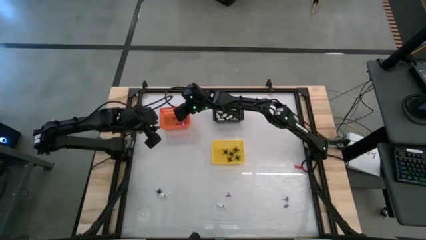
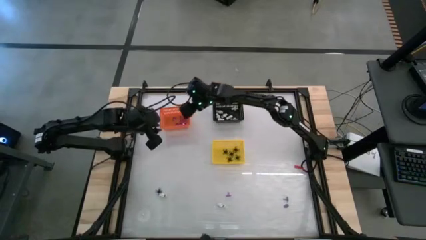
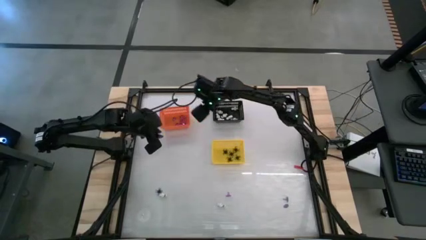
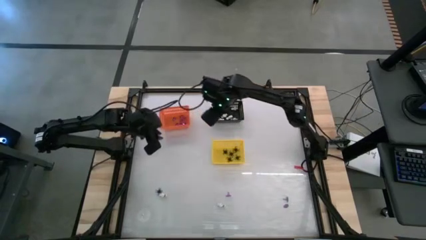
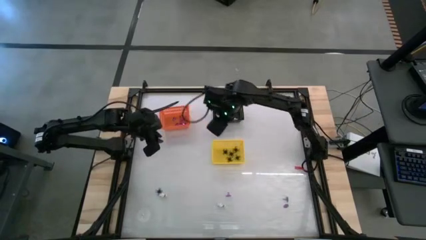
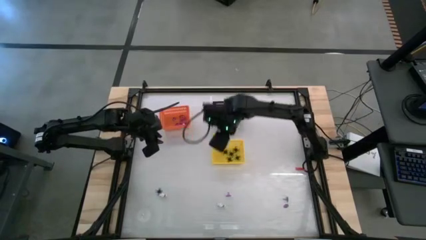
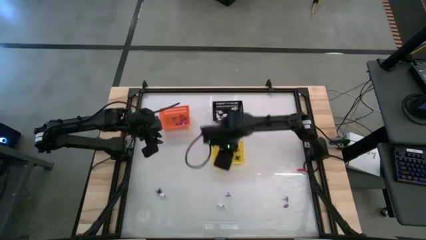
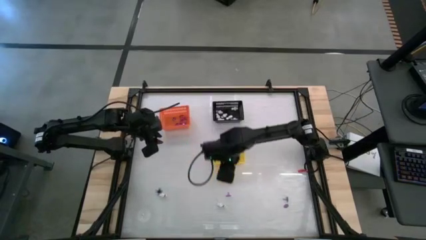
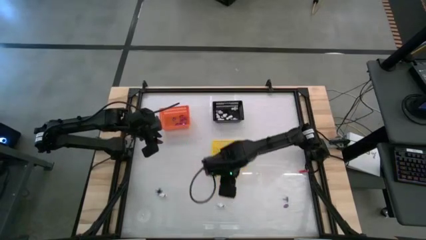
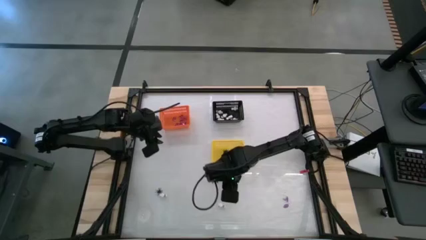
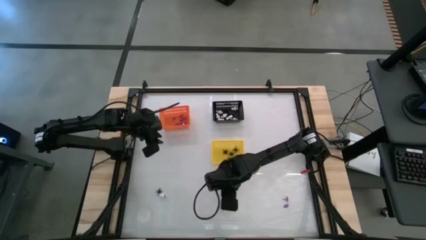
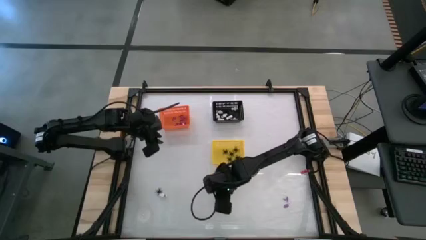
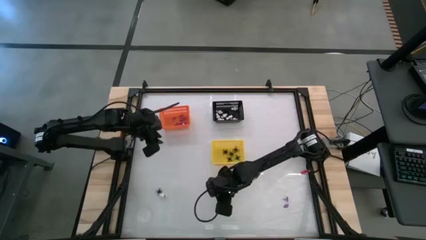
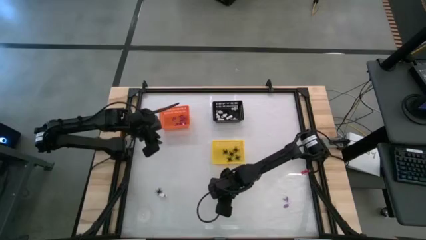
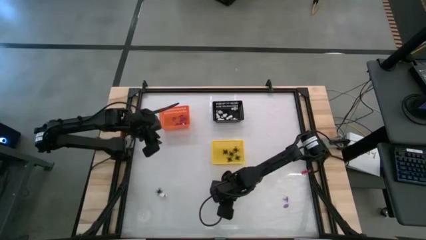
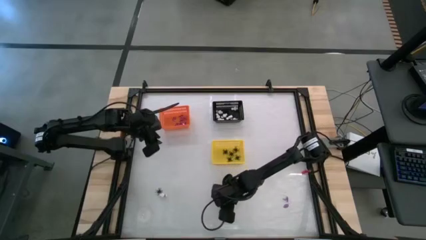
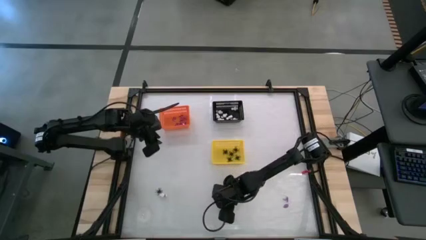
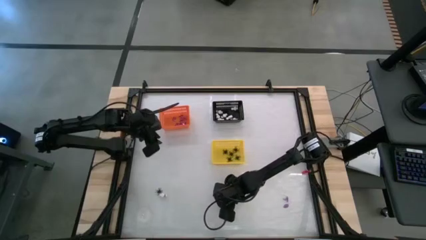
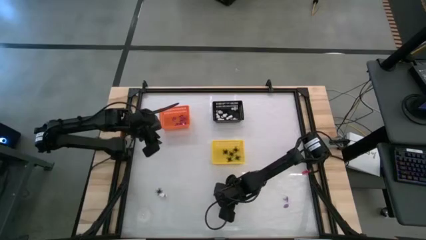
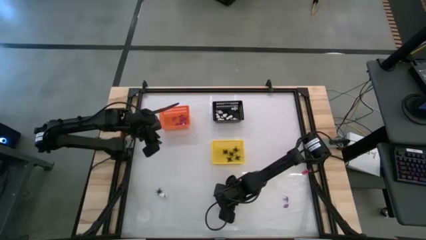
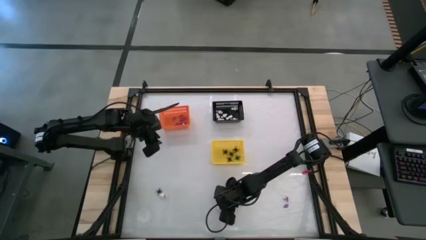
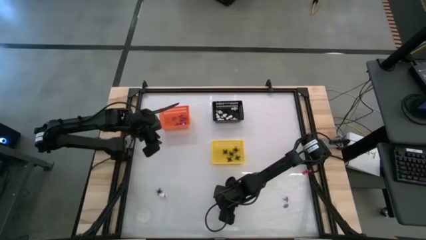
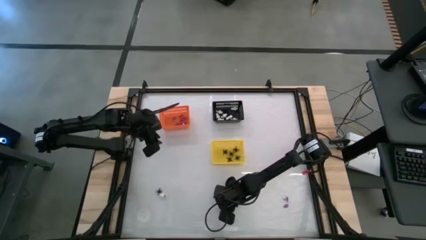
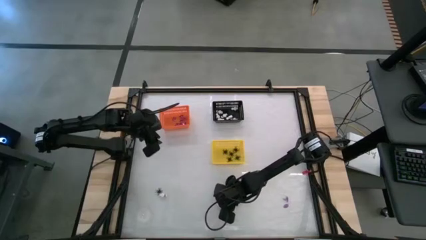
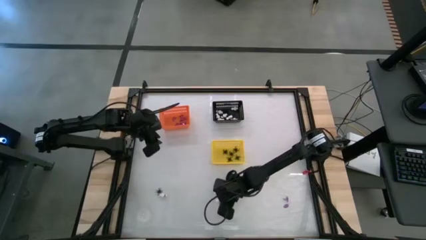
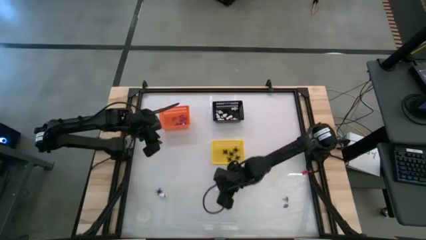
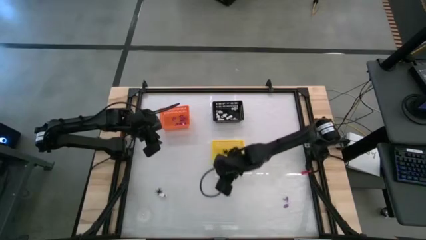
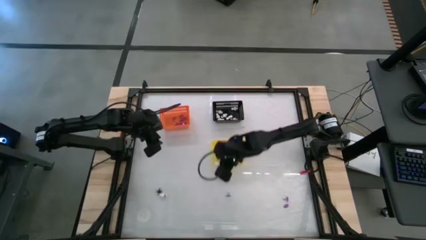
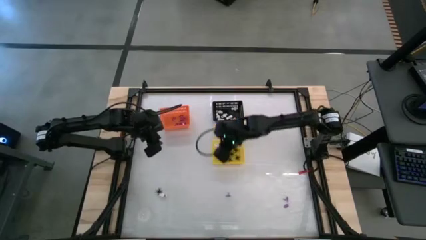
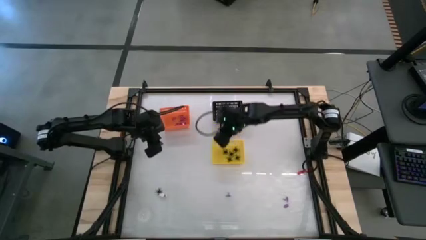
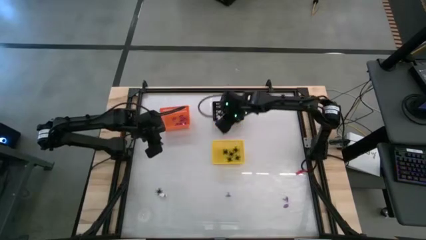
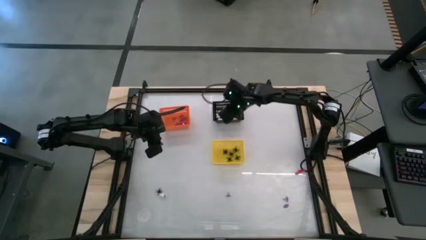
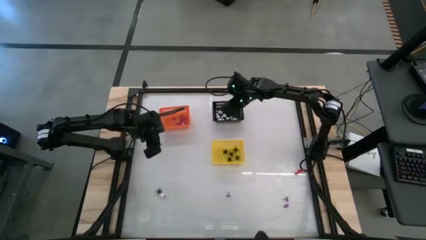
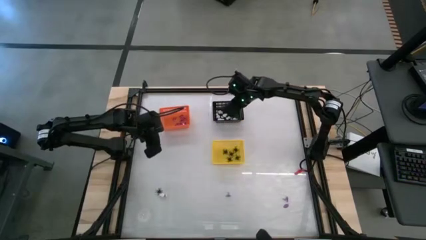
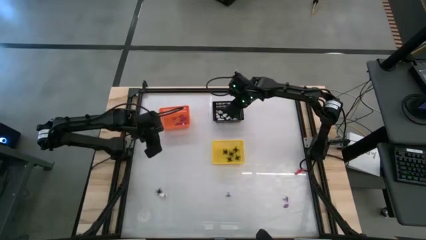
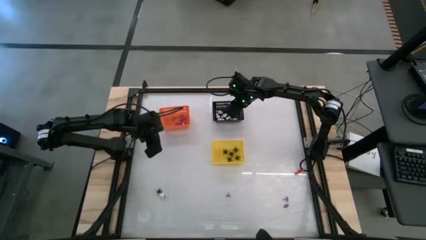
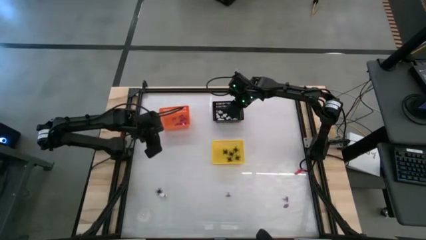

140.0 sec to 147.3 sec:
Task: Sort Halloween decoration
Put the white skeleton toy into the black bin

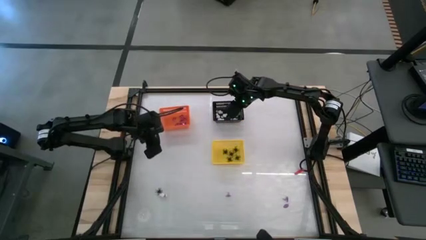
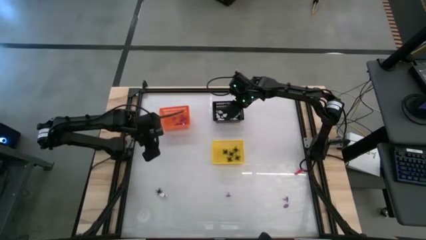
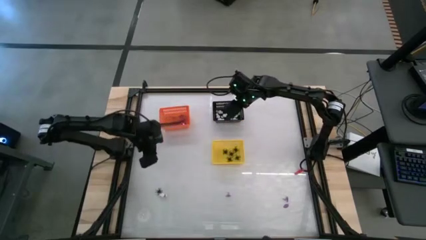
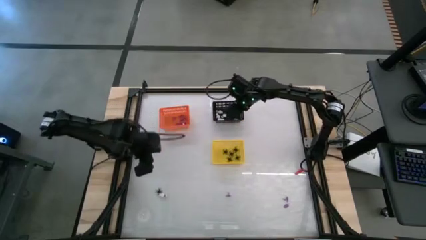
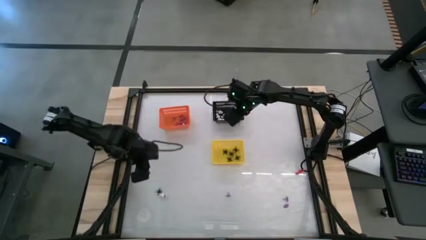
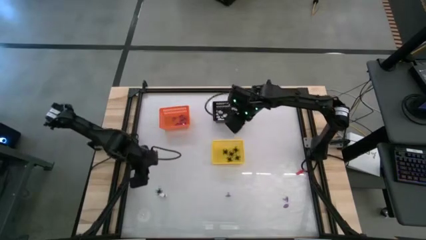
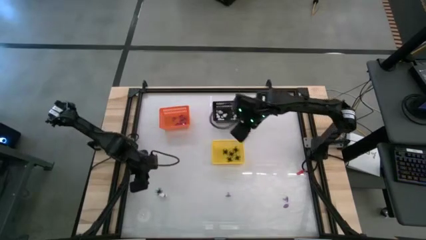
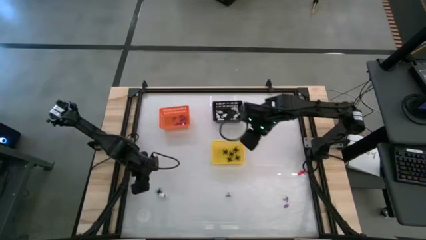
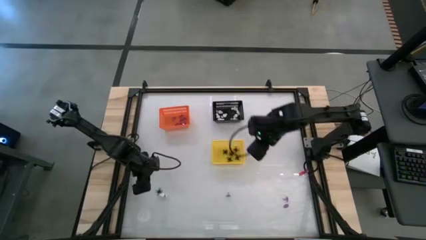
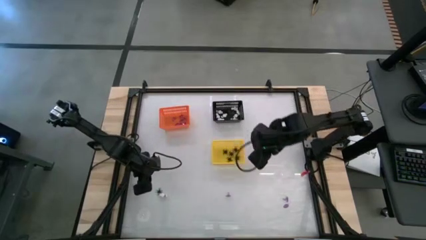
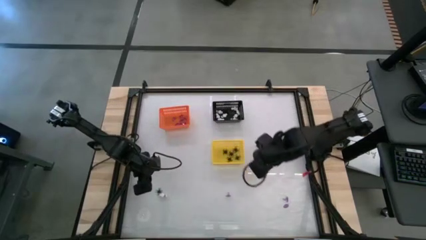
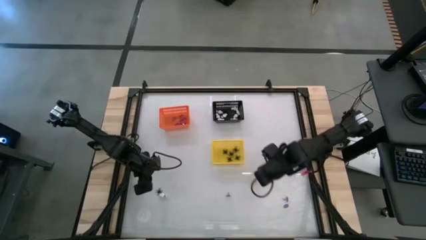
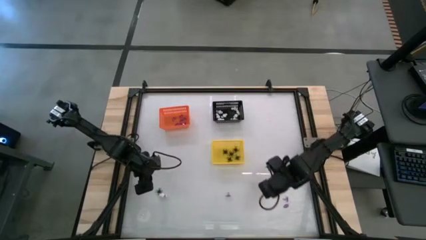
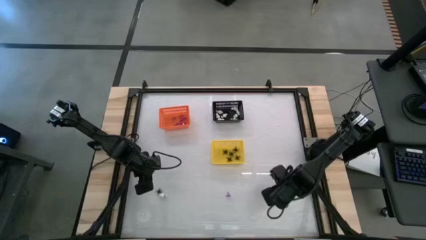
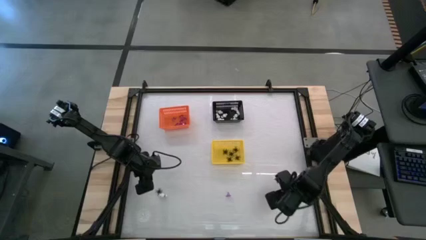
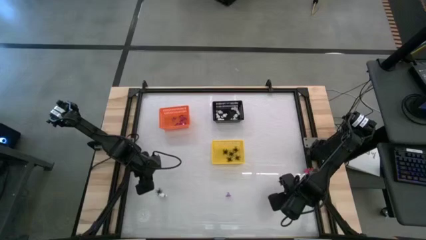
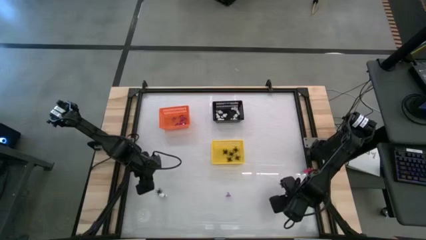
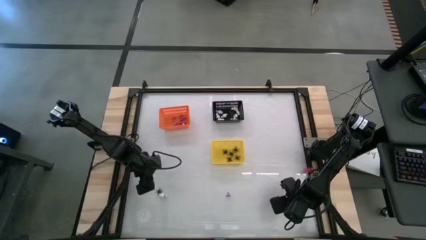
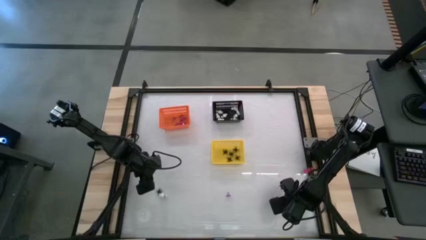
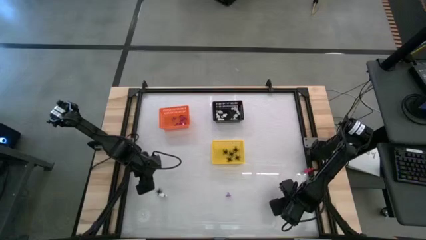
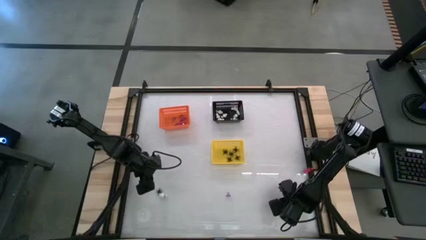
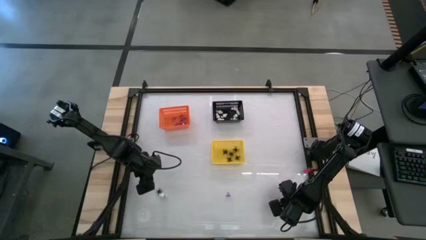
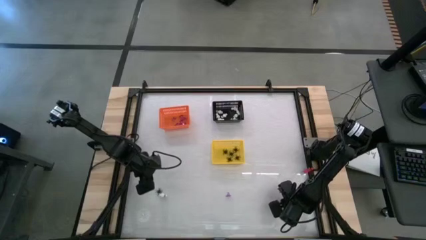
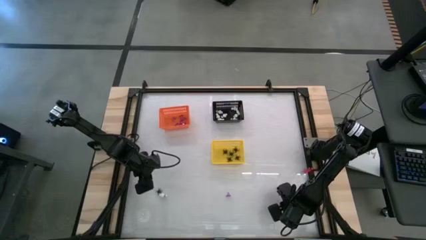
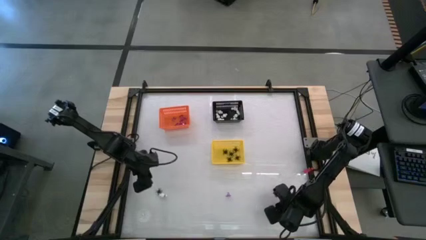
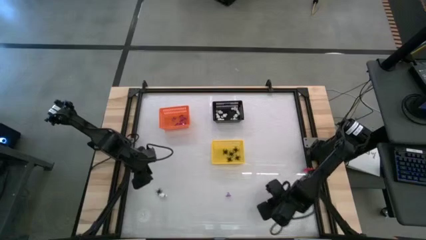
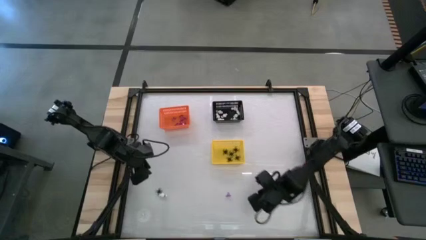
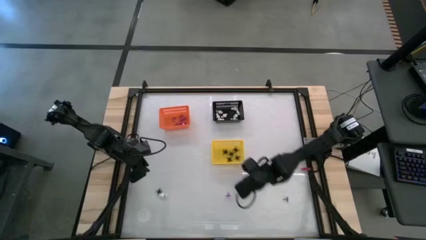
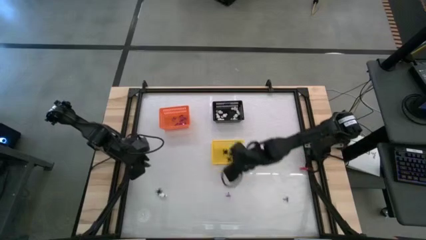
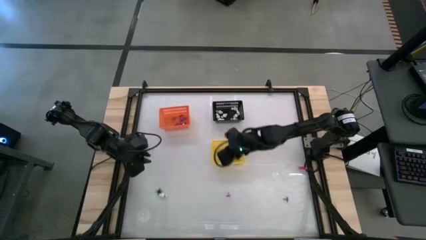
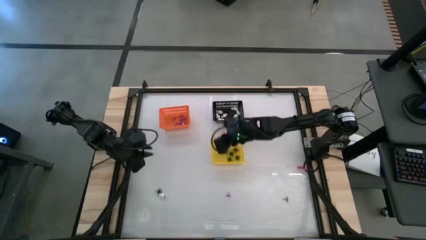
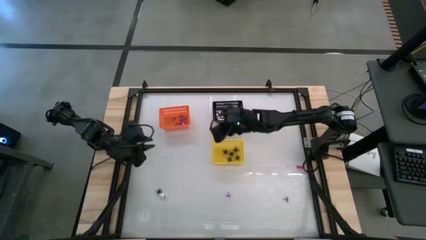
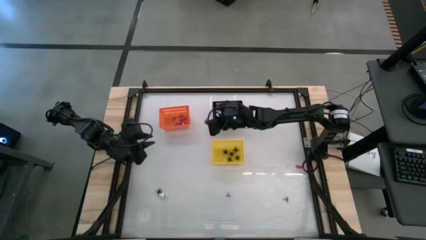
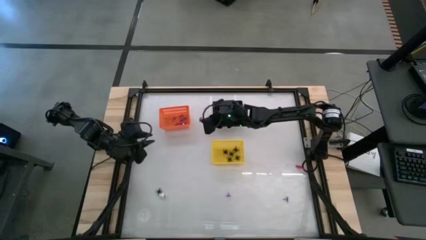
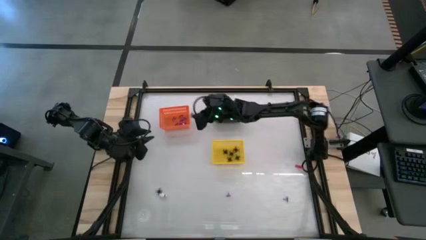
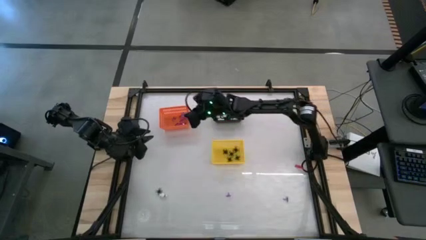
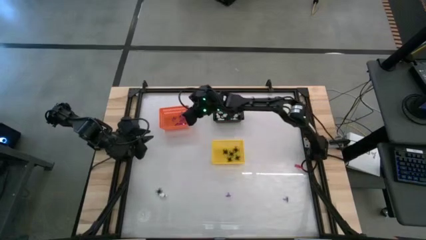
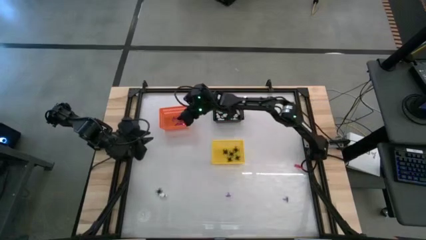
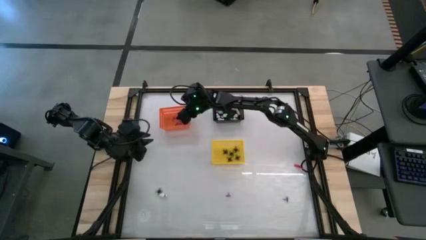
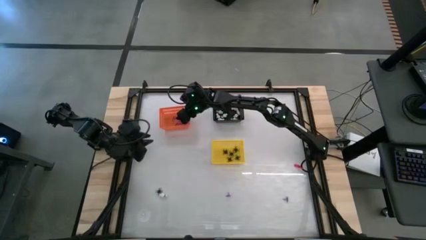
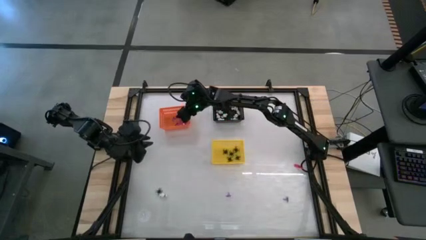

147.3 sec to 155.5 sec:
Put the violet witch hat into the orange bin

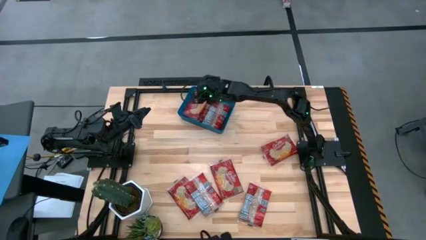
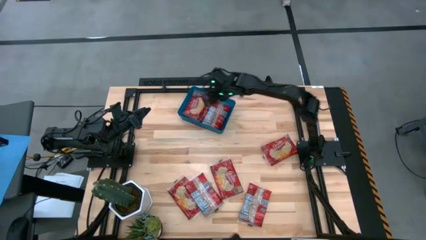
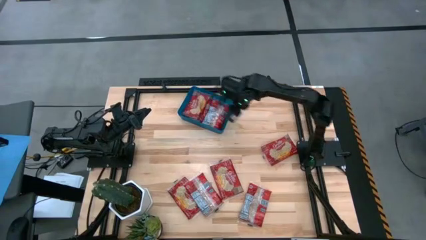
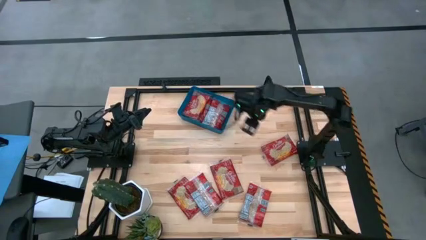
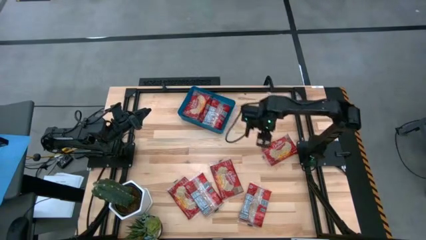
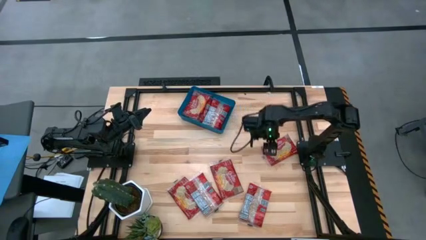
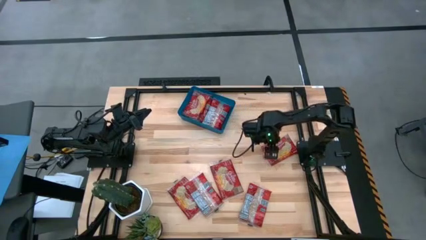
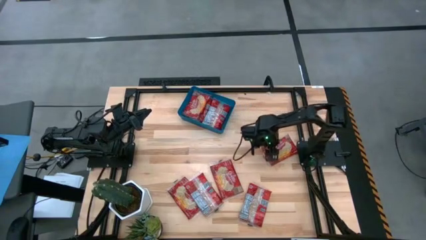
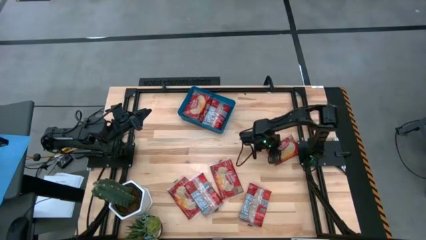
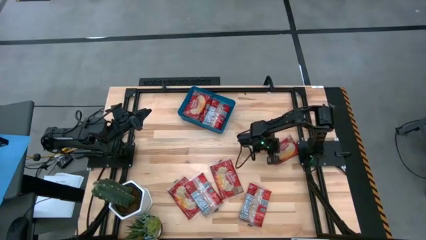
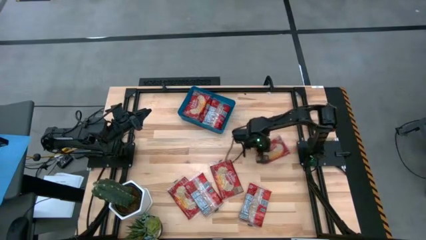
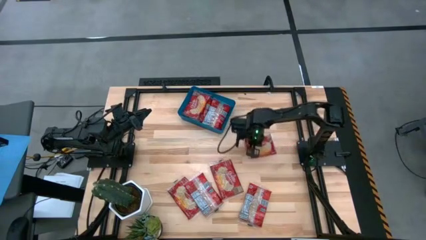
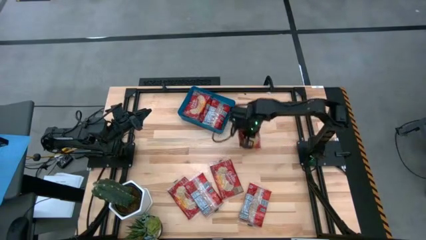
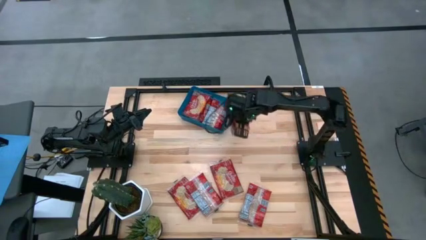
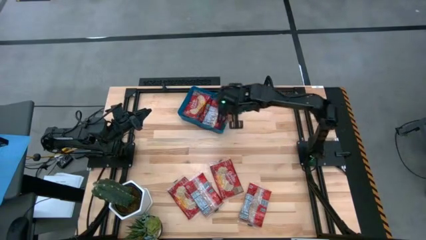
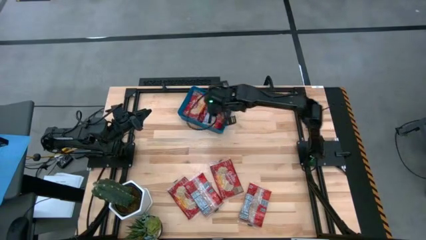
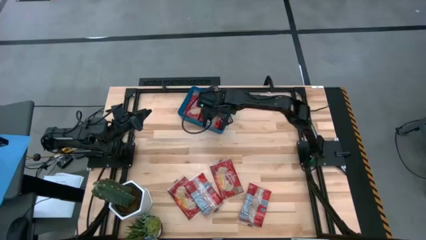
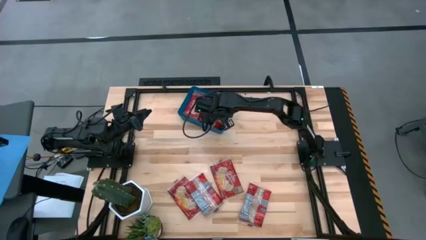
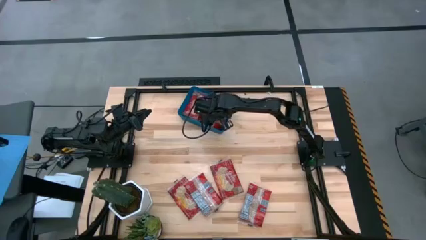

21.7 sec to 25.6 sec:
Task: Sort popcorn bags into baskets
Put the red popcorn bag into the blue bin
